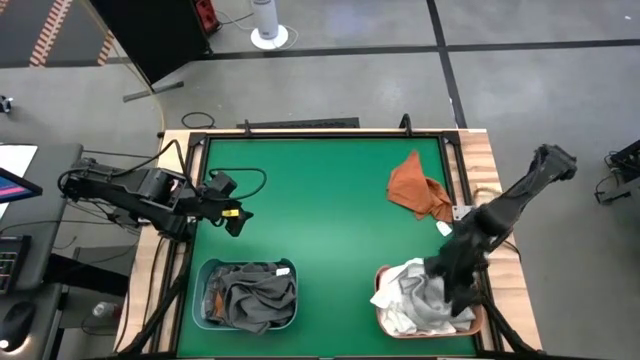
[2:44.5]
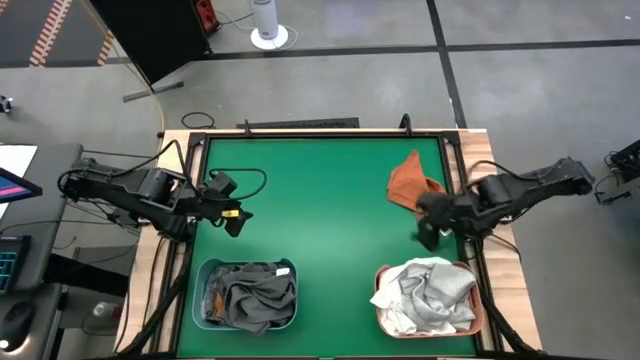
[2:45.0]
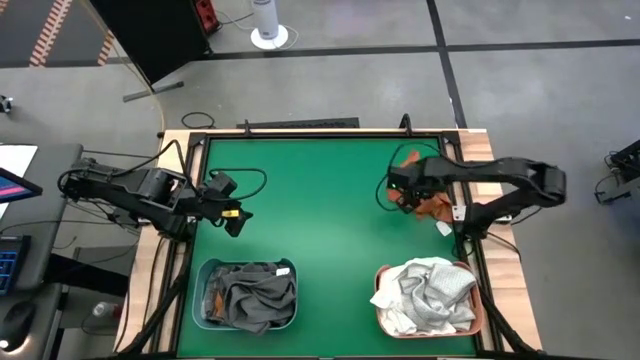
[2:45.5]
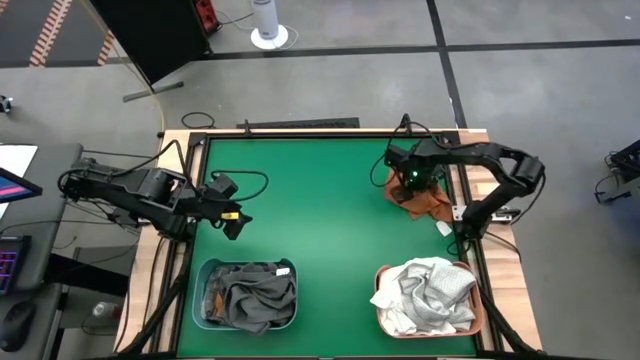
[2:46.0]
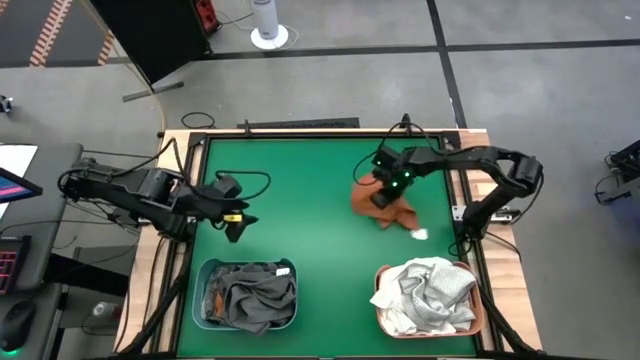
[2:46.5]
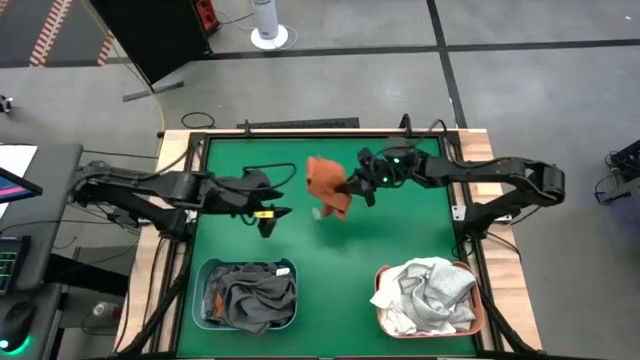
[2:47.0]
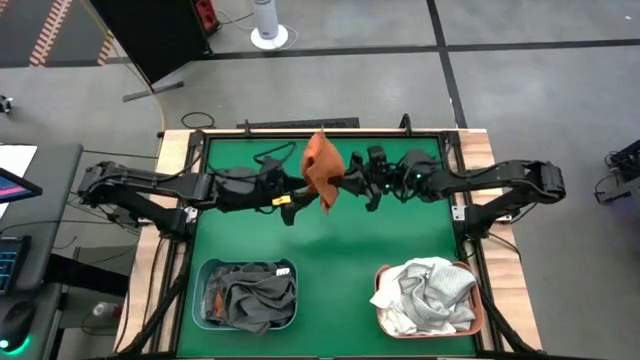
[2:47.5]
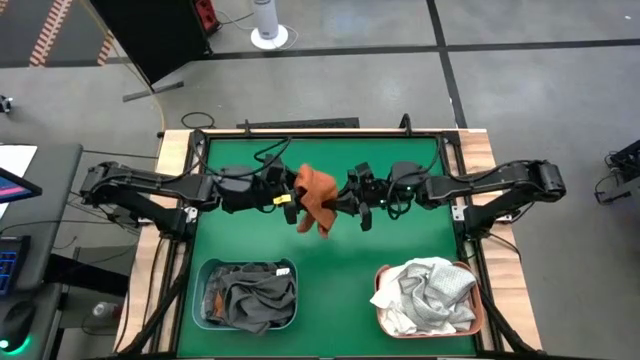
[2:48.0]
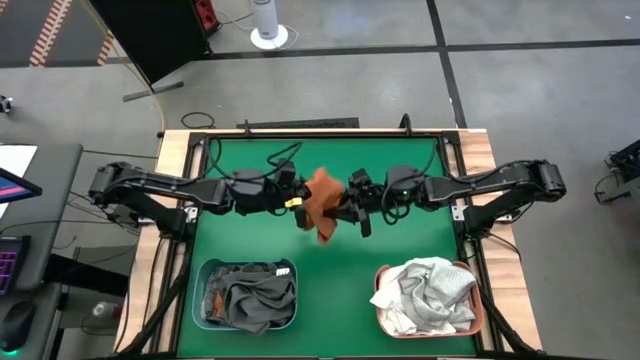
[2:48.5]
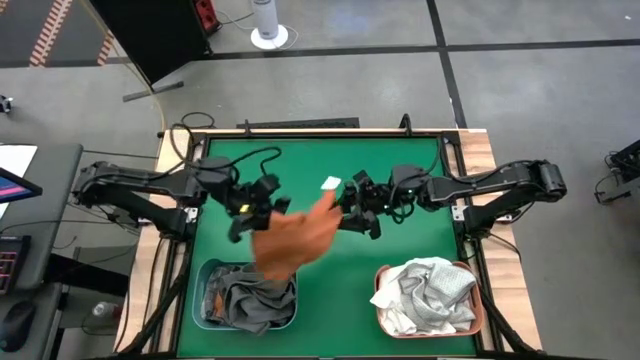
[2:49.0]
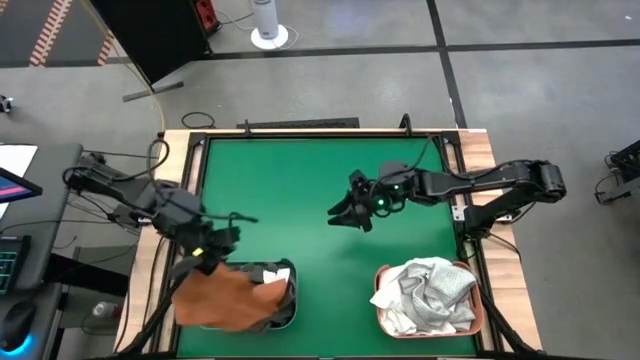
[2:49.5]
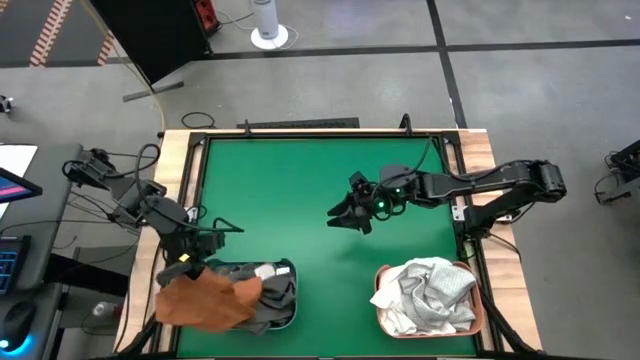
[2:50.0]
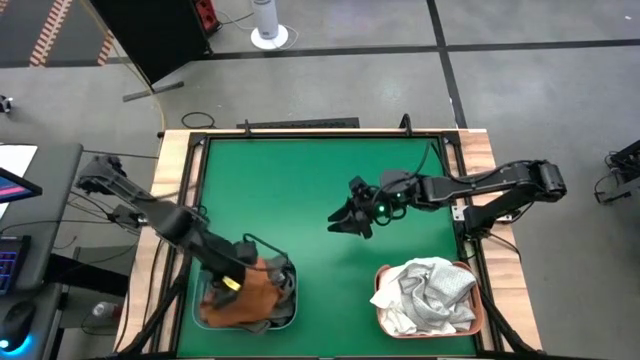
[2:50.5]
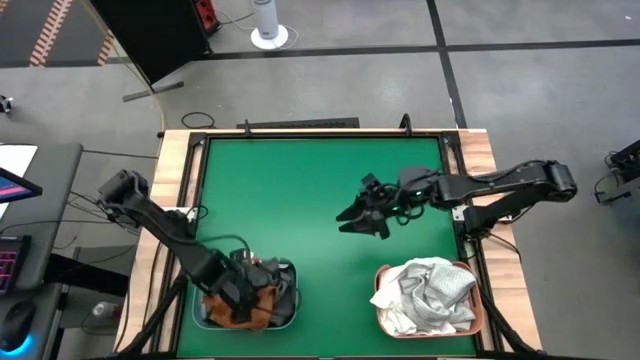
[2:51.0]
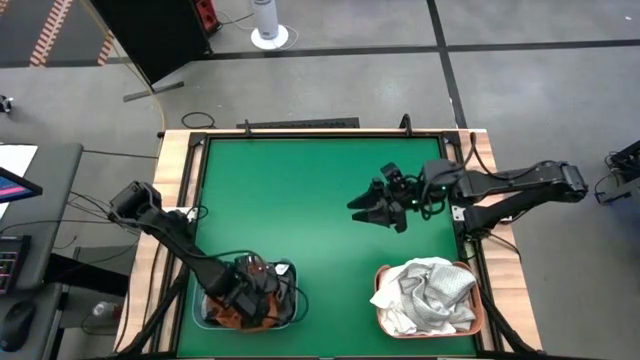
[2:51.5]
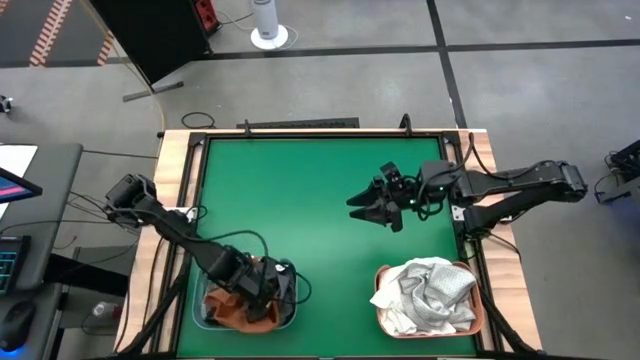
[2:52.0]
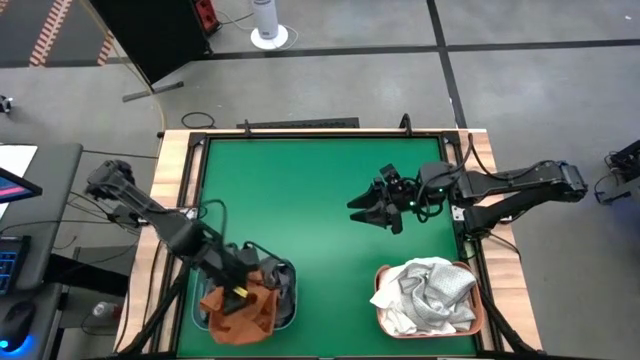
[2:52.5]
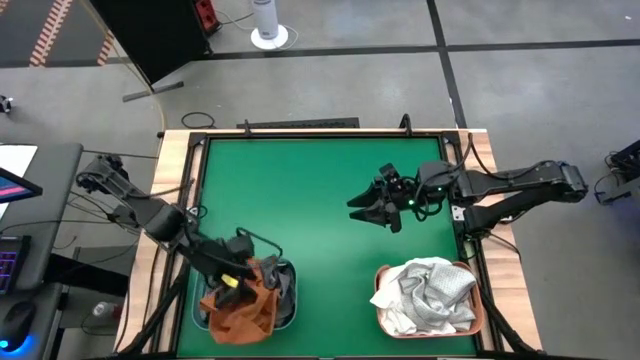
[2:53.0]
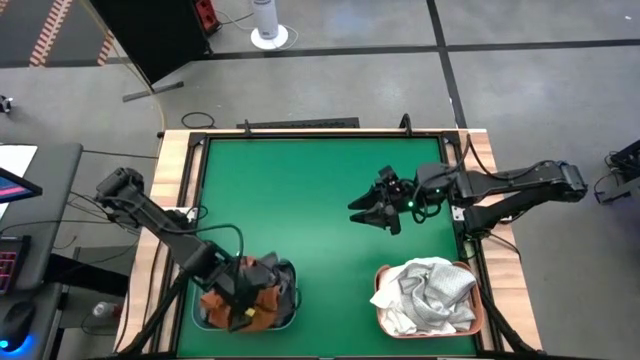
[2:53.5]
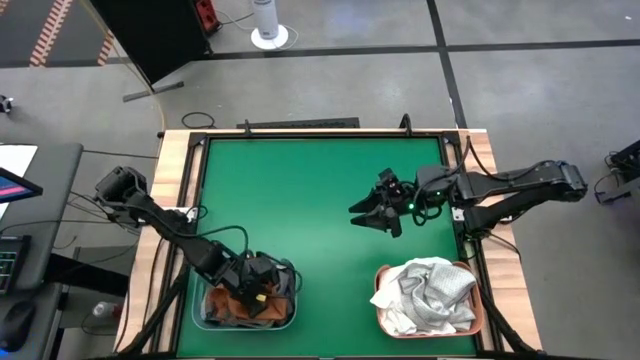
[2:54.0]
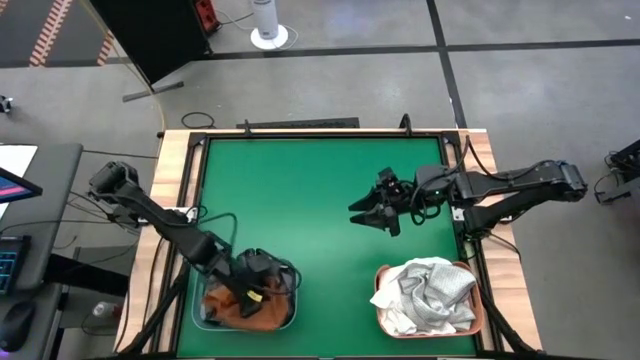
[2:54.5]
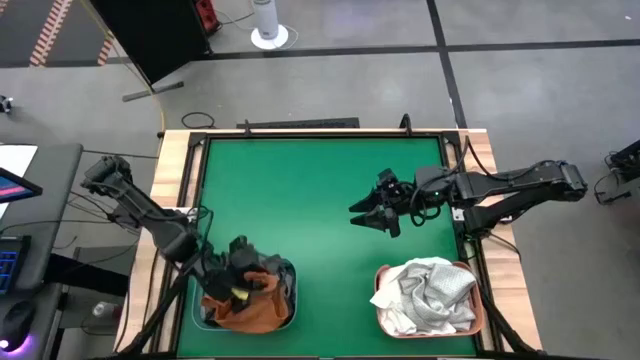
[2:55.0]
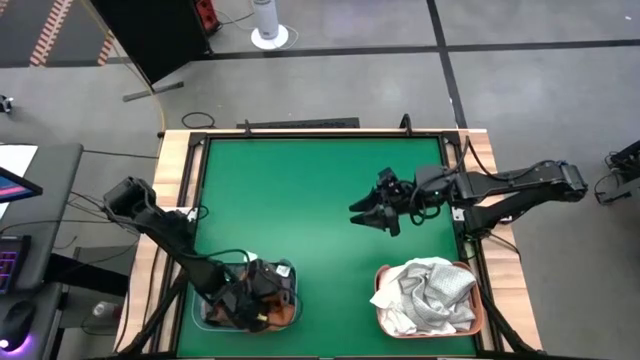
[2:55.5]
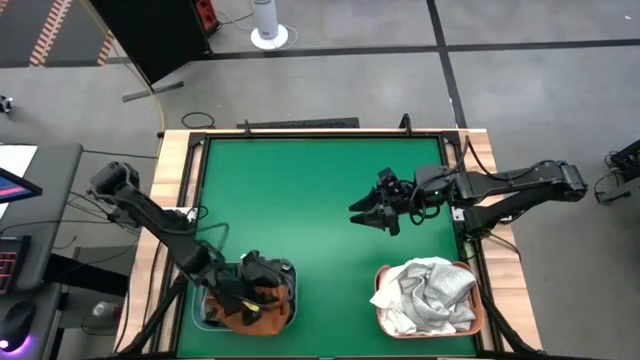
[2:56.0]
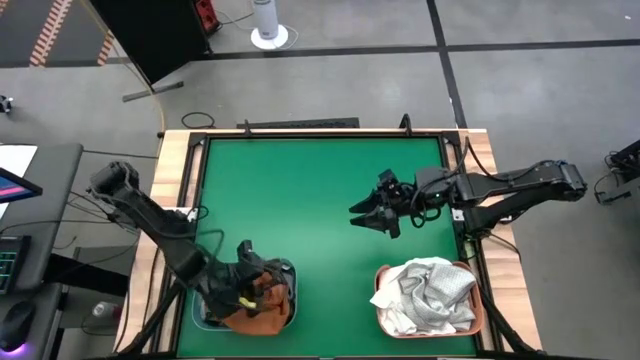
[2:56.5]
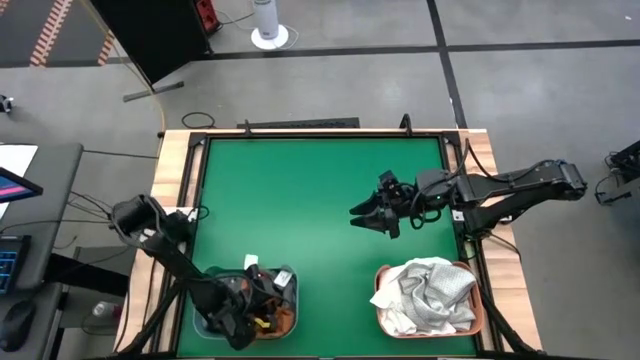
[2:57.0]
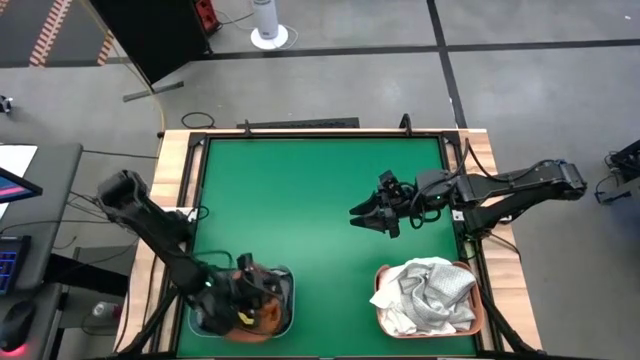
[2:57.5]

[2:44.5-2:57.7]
Task: Sort towels by color in basket
Put the orange towel into the green bin

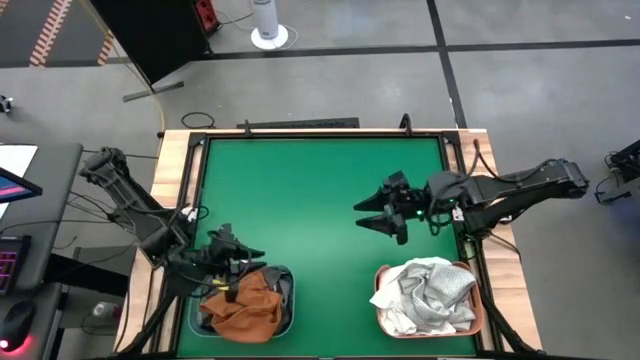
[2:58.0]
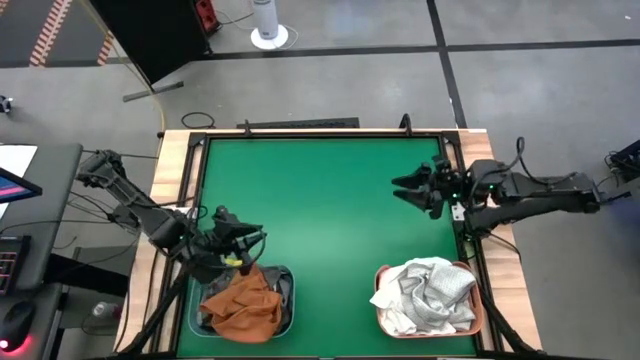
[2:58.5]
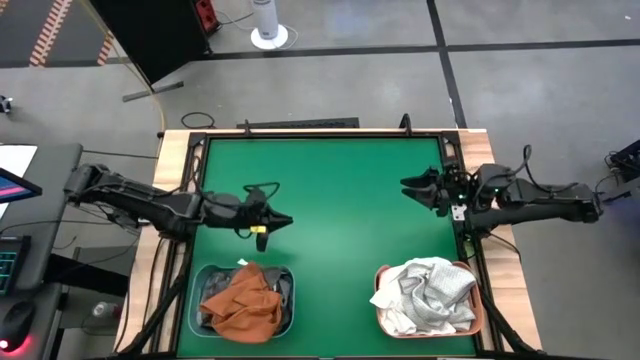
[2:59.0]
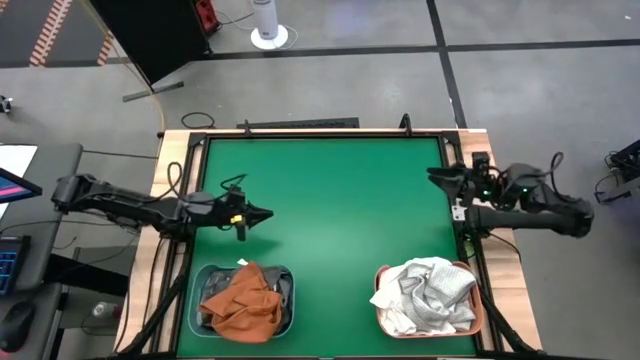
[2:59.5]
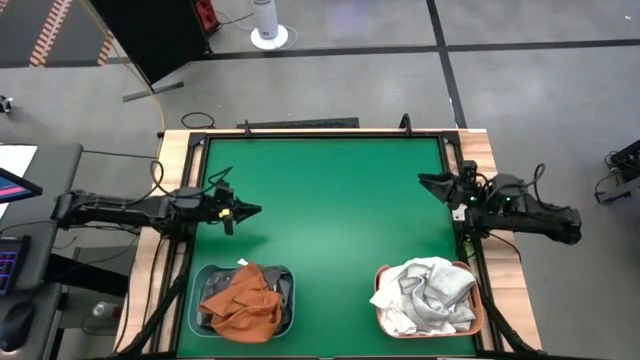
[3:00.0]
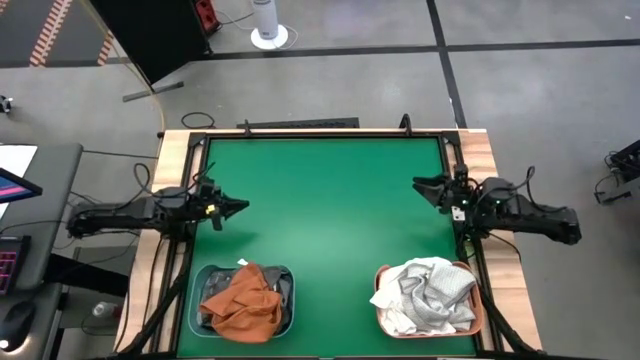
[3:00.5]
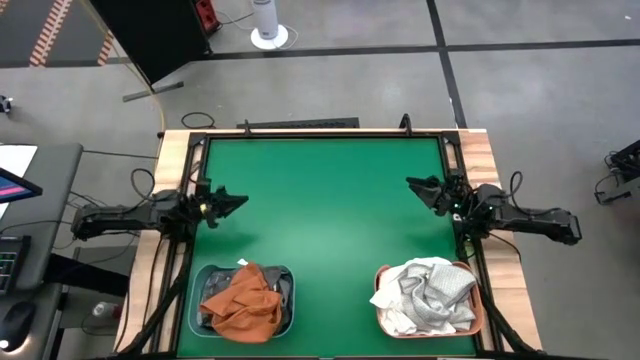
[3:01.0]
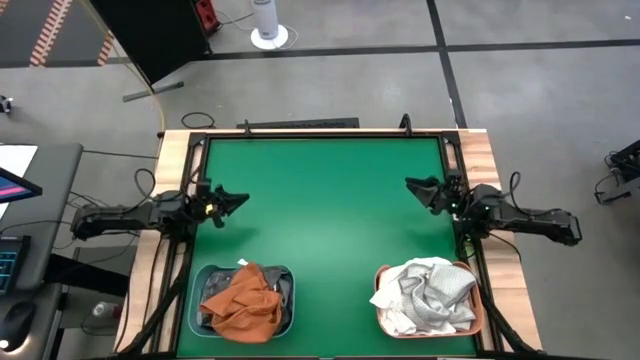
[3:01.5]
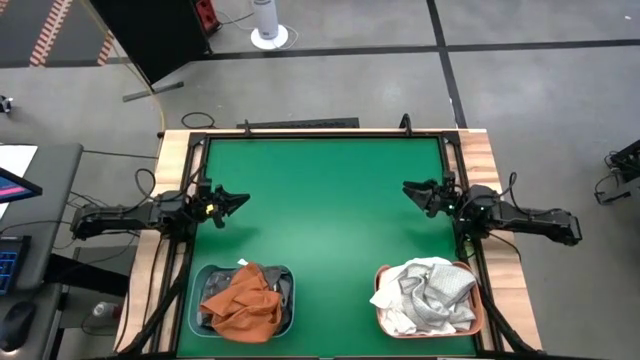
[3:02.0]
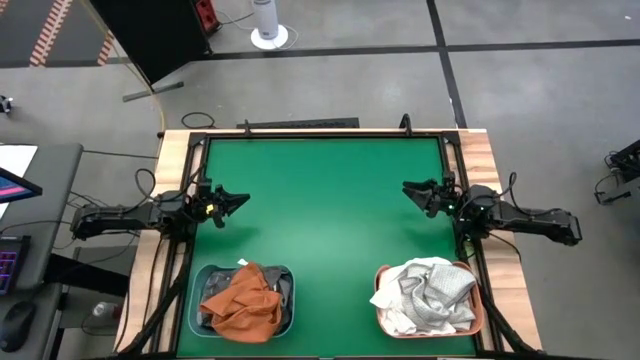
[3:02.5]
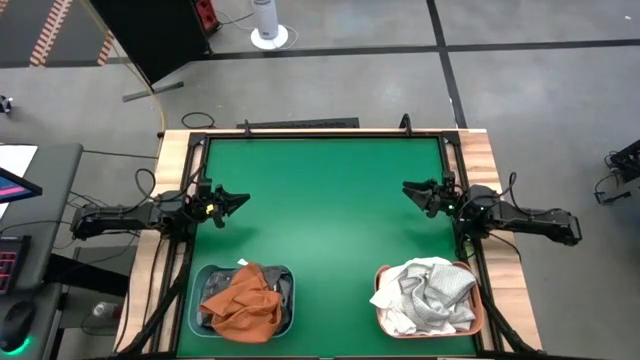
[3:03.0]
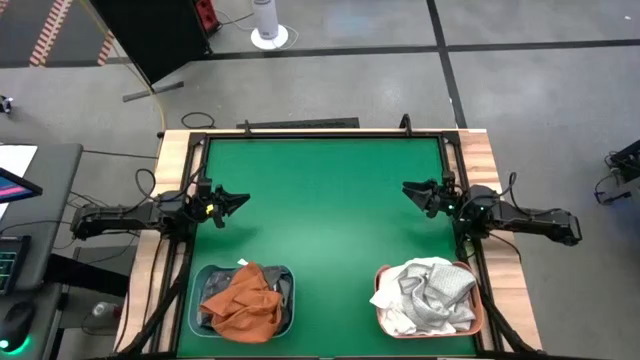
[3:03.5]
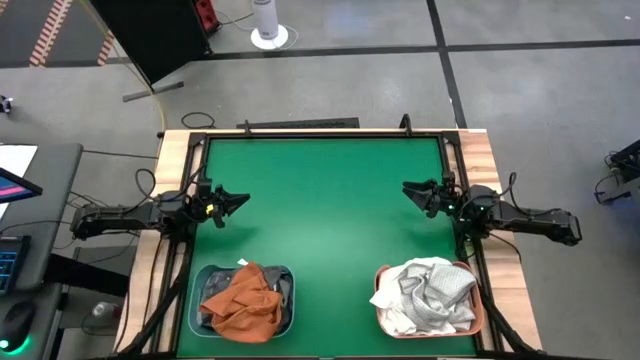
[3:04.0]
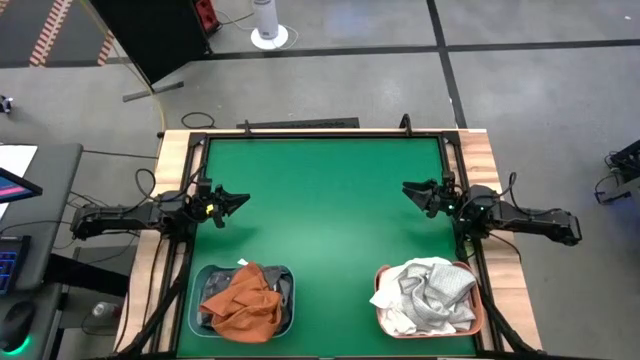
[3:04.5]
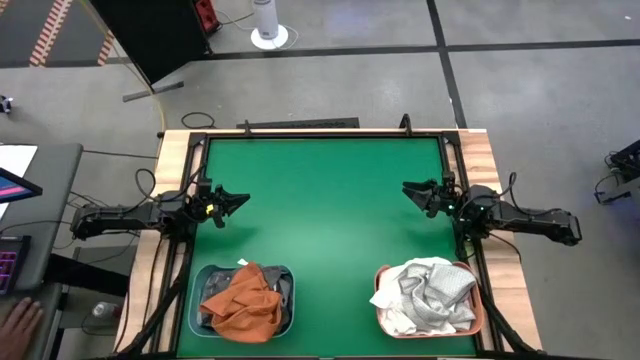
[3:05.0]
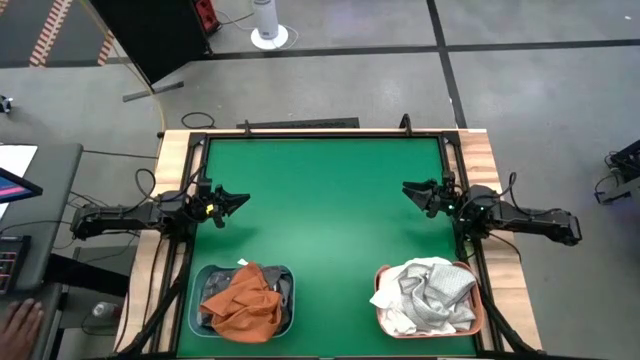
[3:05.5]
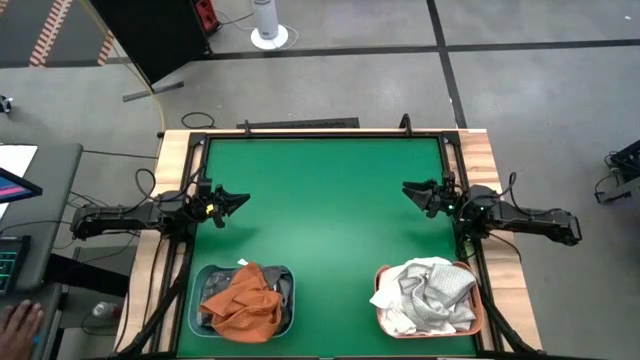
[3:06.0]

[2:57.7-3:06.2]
Return to Home Position
